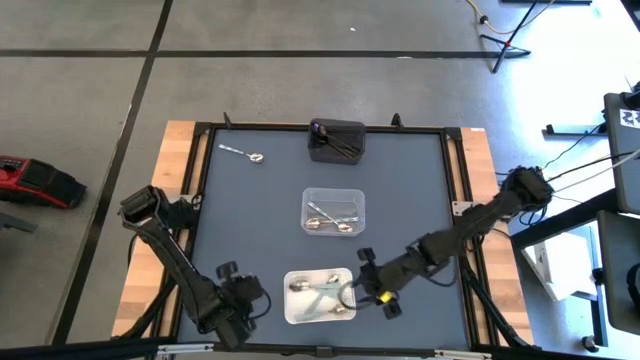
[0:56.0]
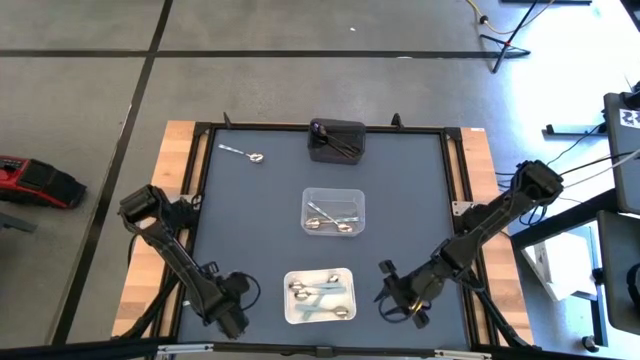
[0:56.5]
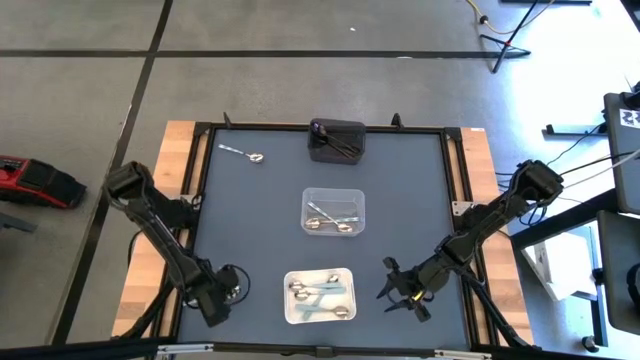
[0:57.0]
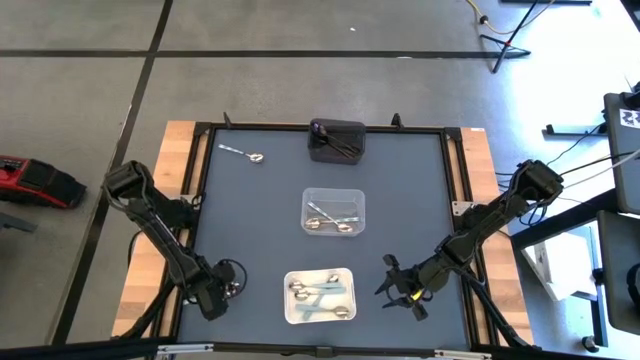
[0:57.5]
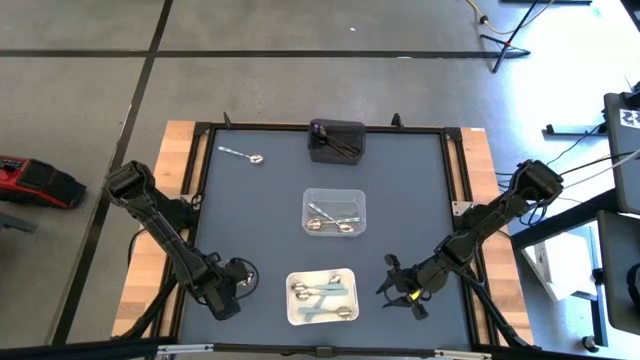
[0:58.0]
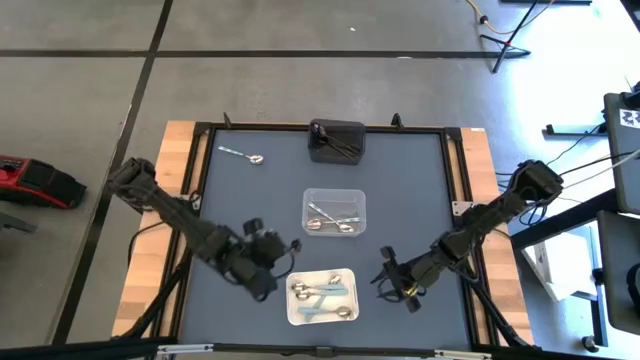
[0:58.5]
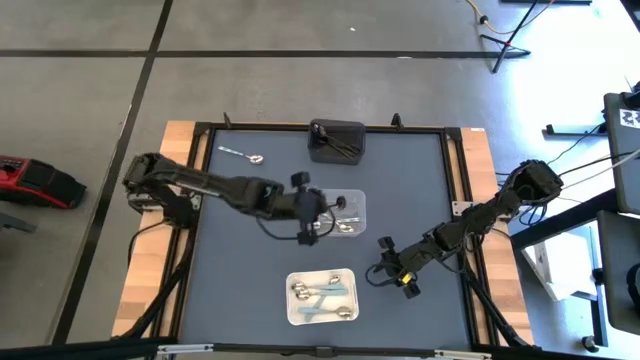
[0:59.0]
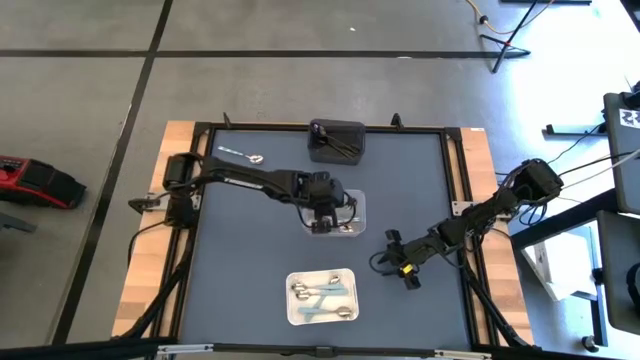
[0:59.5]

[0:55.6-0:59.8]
Task: Sort silverware by color (type)
Put the bottom green patterned spoon into the transparent bin

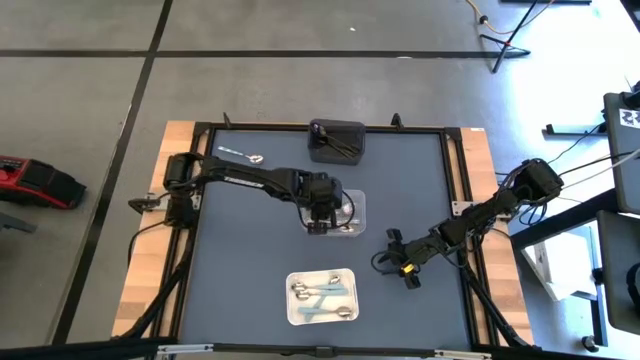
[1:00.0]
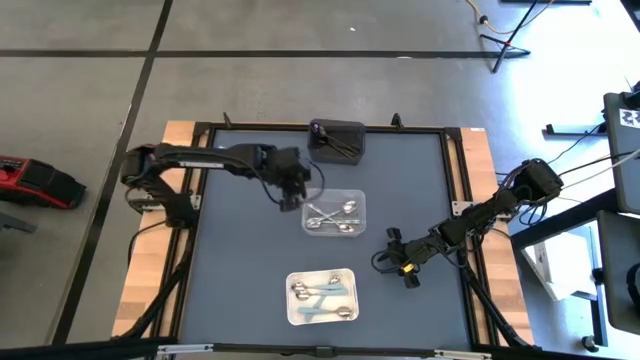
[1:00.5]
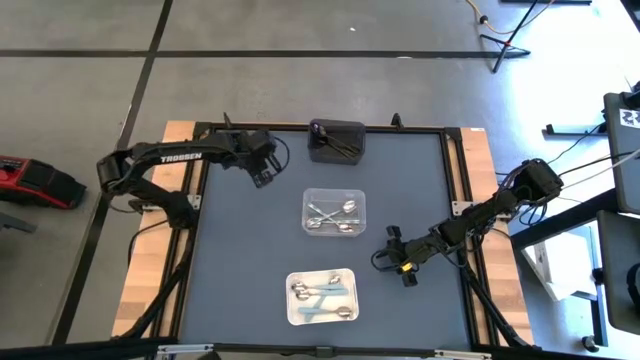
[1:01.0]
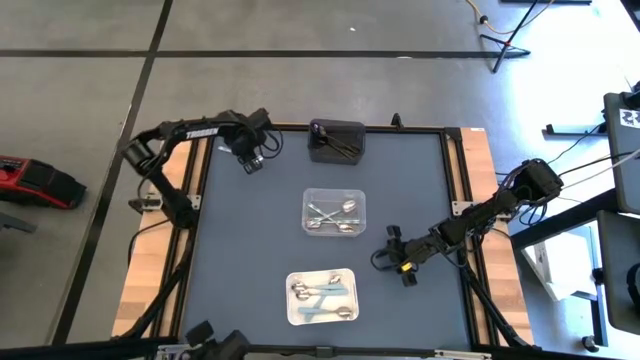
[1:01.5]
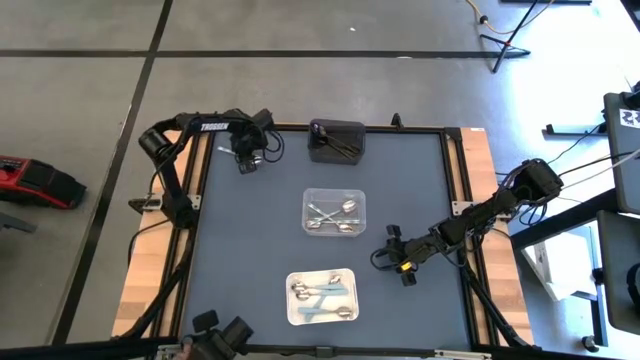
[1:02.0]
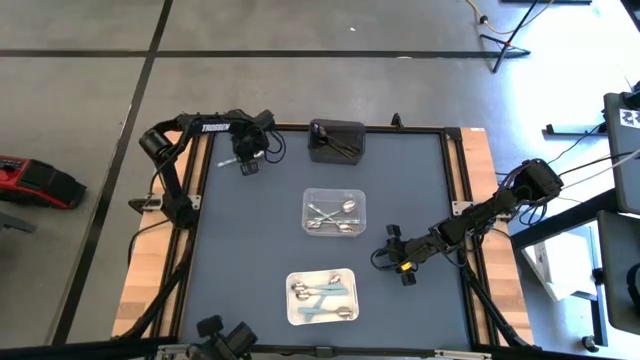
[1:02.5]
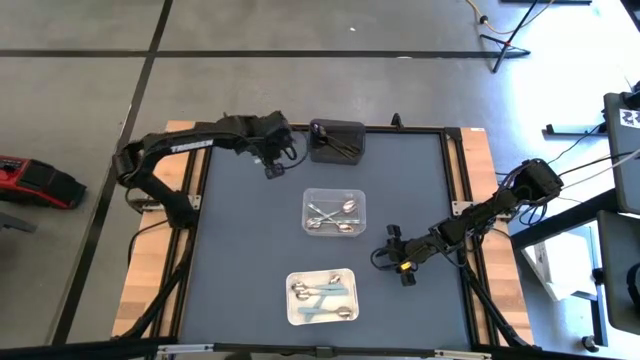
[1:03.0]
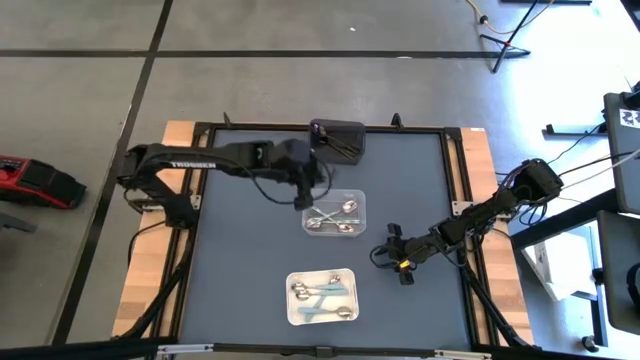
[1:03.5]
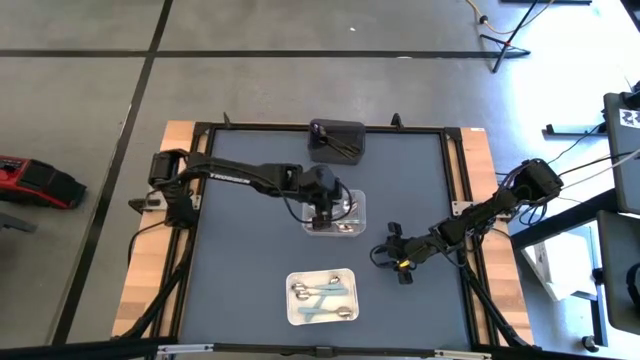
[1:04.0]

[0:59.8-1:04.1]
Put the green patterned spoon into the transparent bin

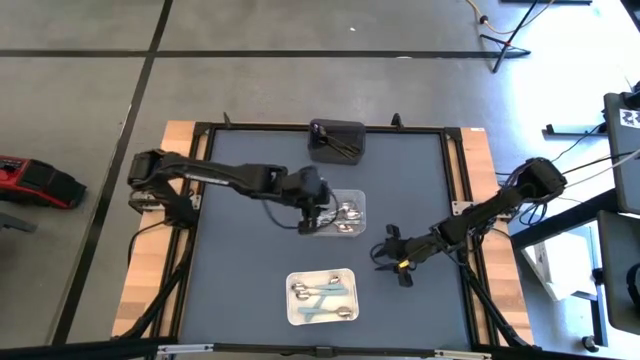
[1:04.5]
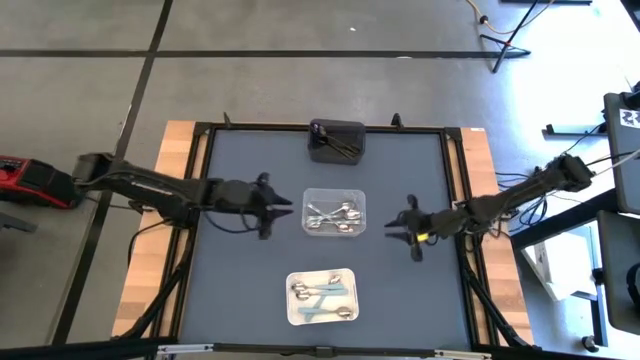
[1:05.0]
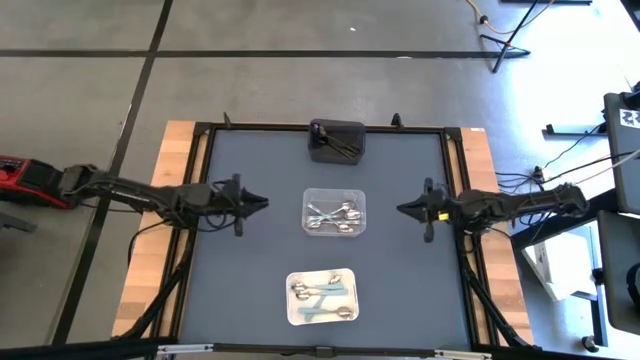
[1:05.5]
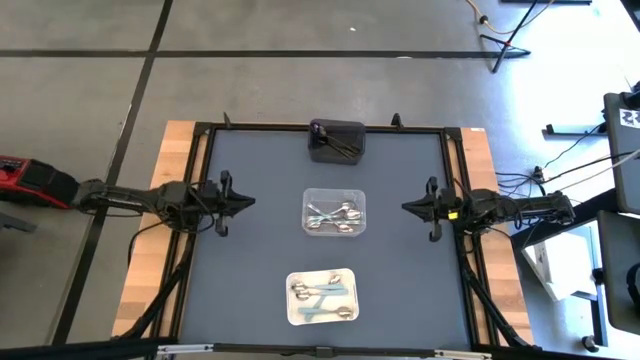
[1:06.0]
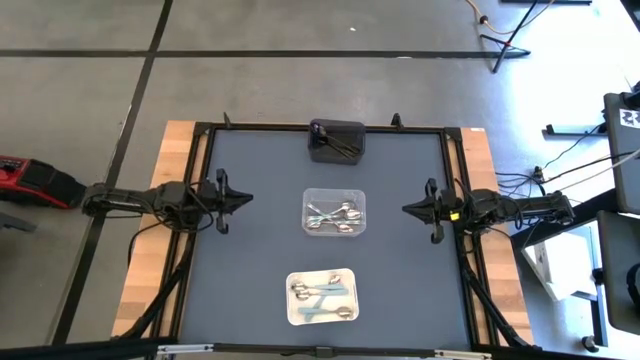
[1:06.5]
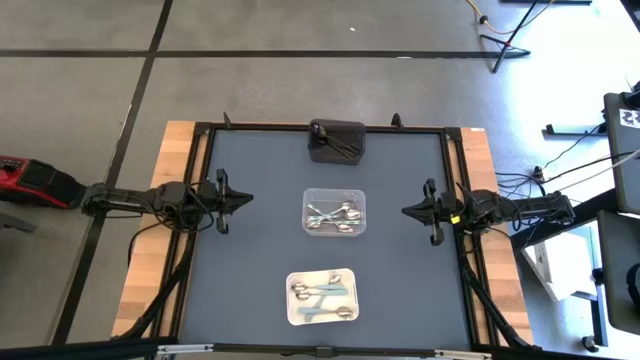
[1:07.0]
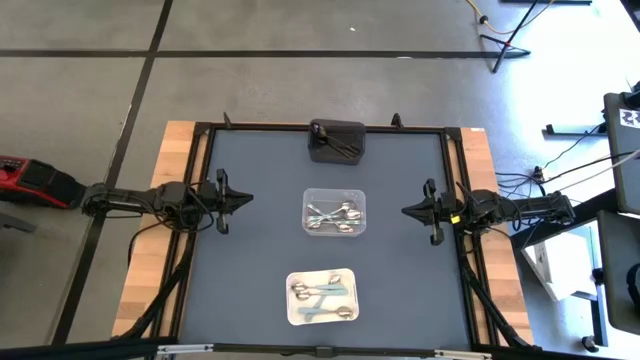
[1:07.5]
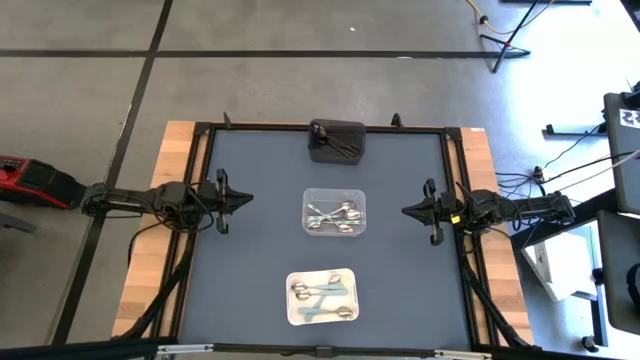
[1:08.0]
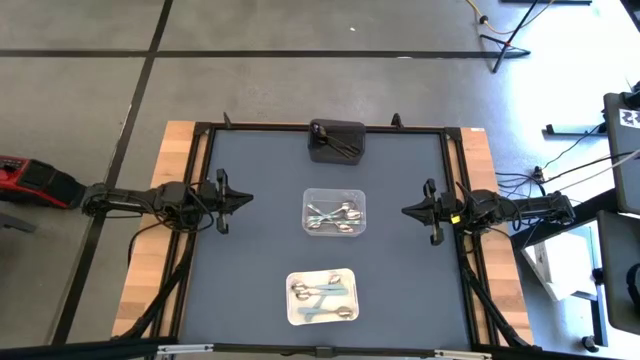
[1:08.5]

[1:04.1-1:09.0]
Return to Home Position

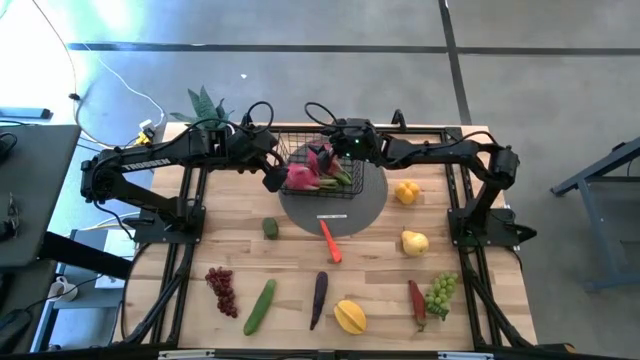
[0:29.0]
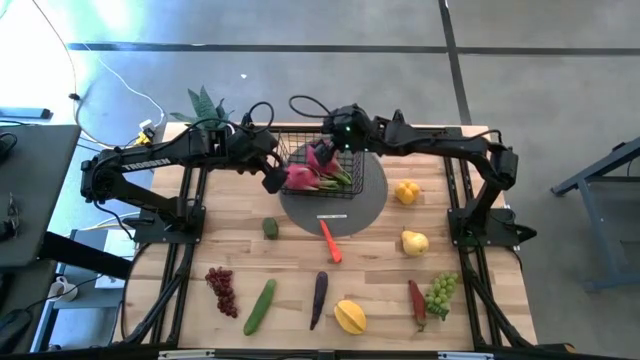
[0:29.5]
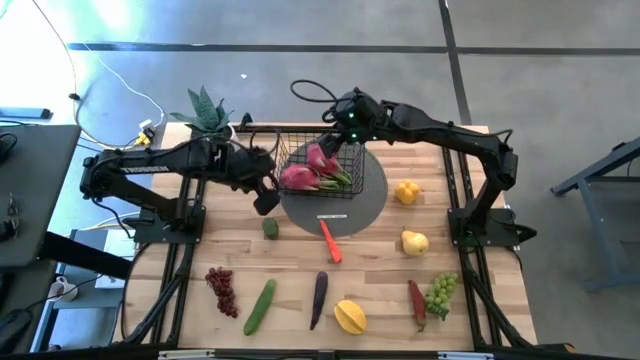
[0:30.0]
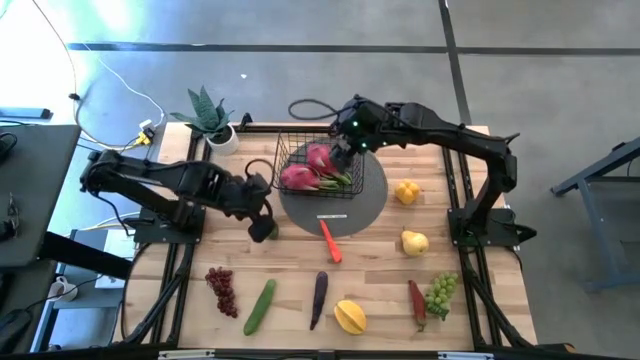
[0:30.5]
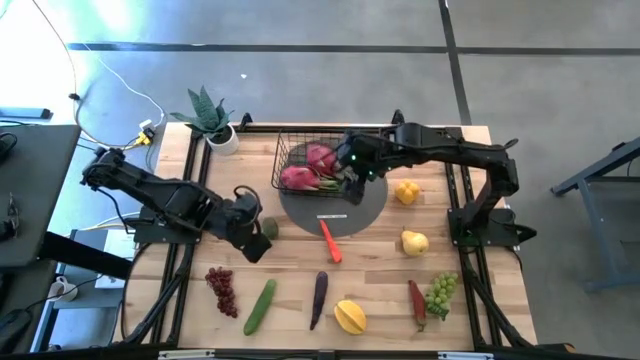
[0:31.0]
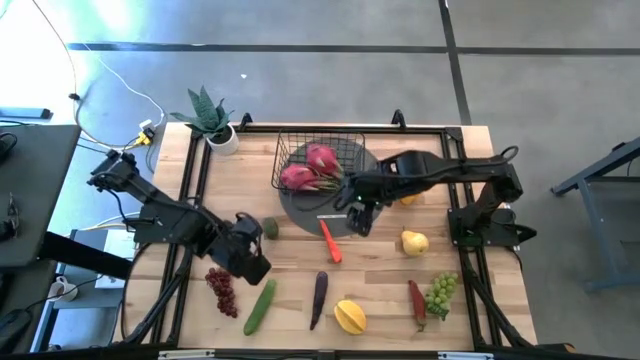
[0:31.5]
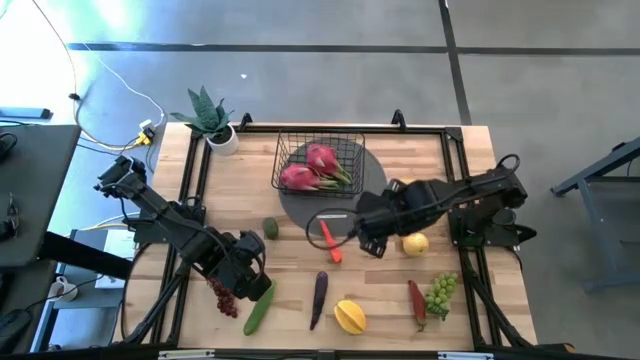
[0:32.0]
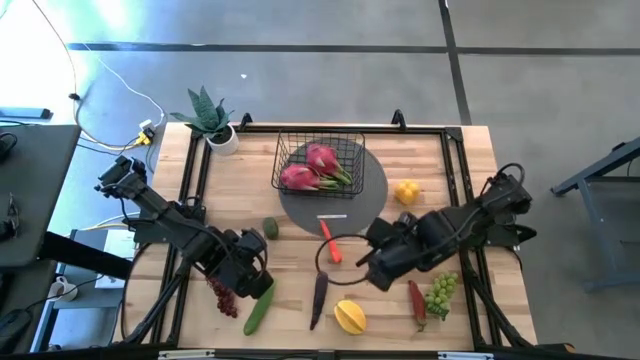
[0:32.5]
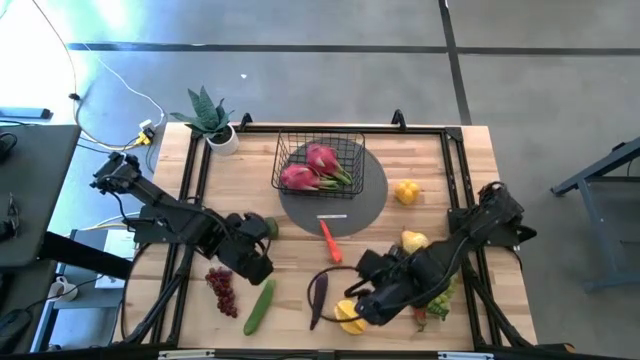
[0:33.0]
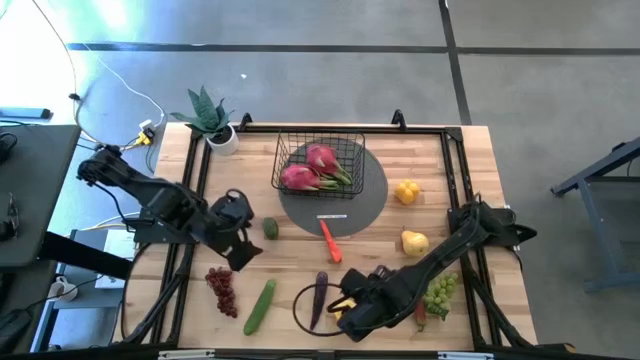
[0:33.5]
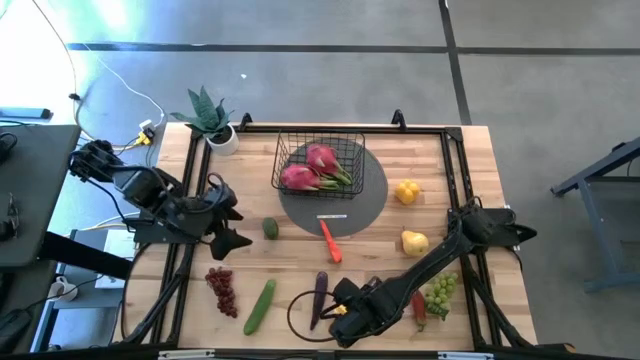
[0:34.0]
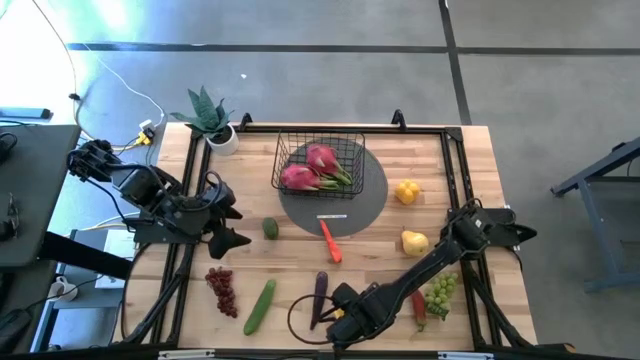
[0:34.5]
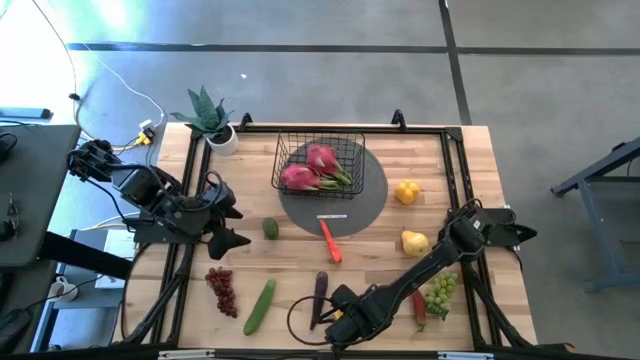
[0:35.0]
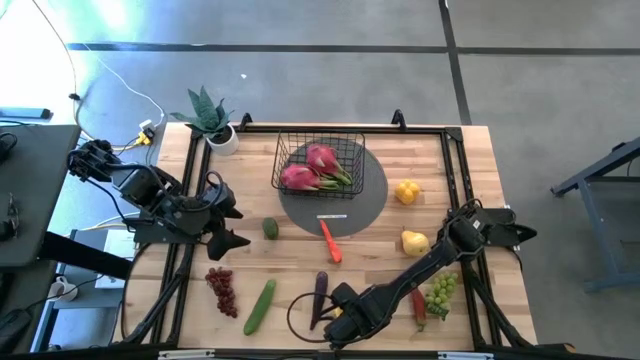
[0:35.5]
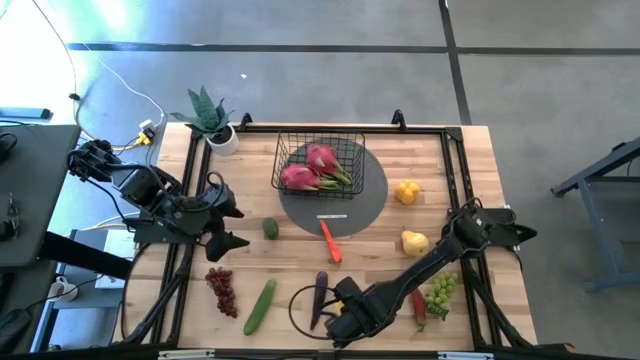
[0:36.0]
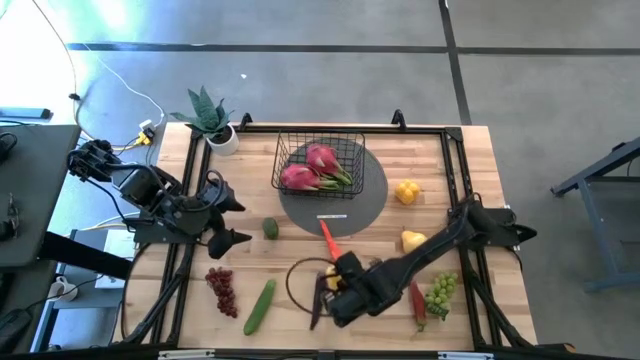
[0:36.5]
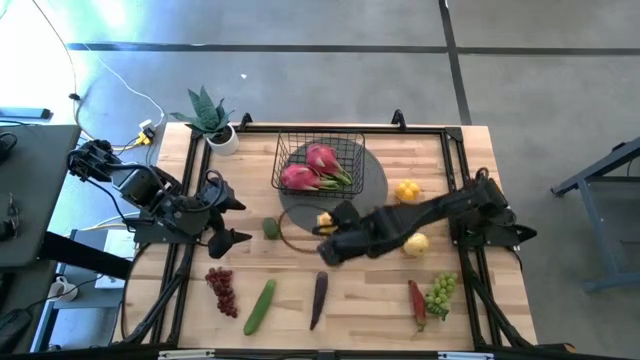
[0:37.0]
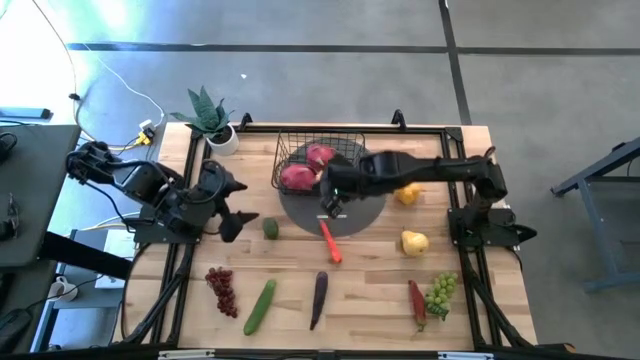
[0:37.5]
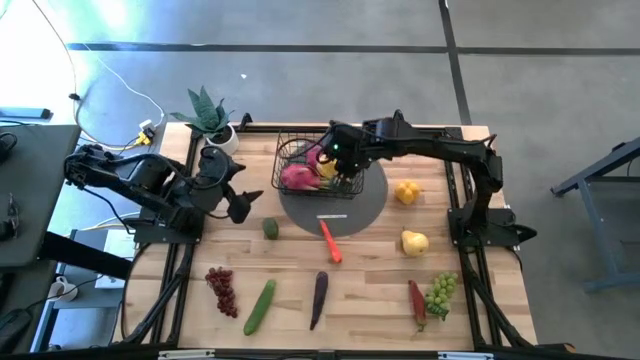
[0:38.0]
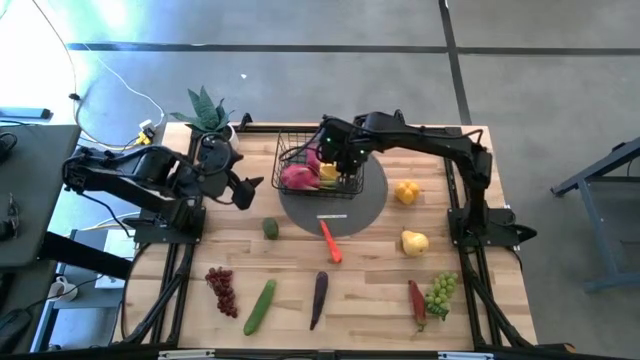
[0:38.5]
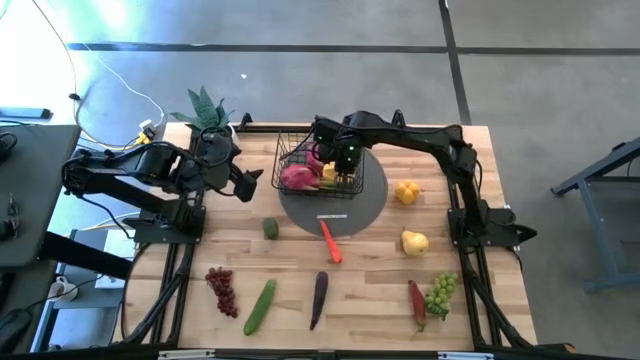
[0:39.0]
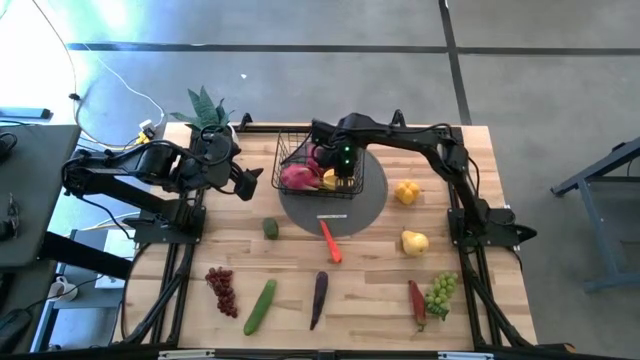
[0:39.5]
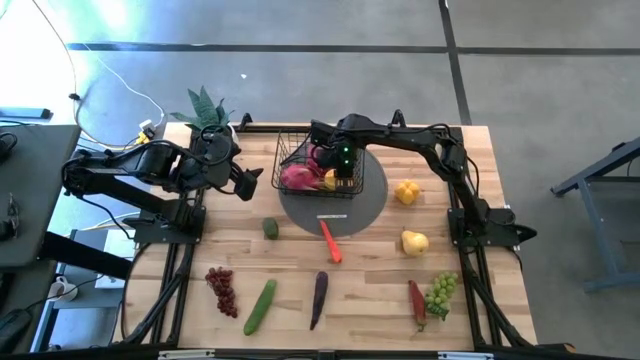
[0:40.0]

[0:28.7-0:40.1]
Task: Build produce basket
Put the yellow starfruit into the black wire basket
